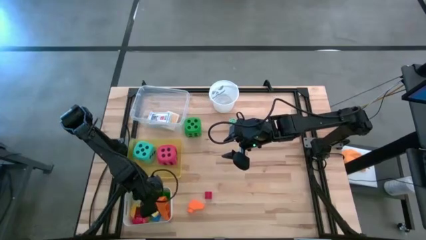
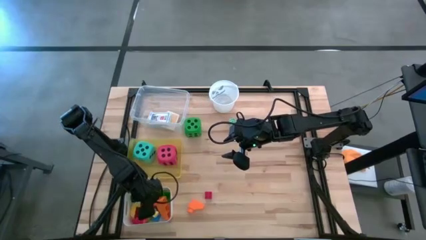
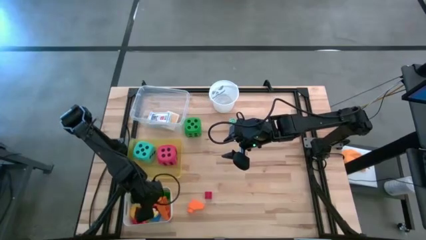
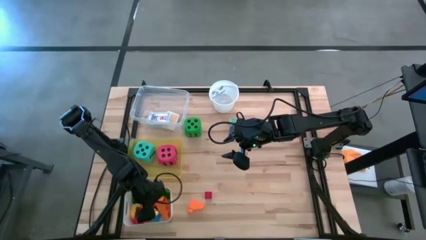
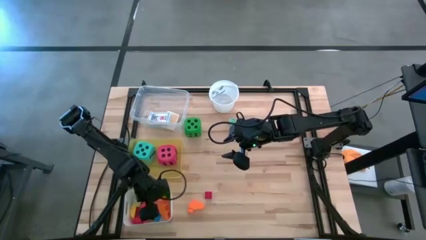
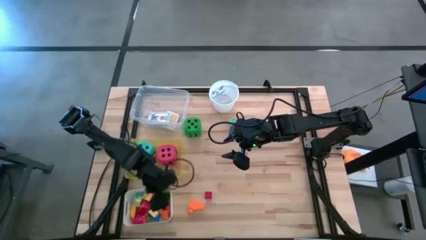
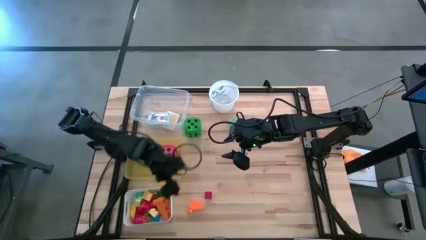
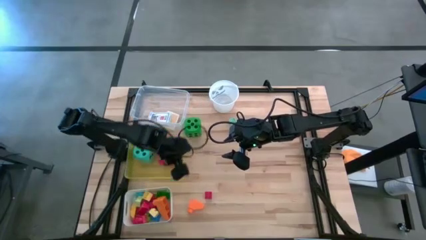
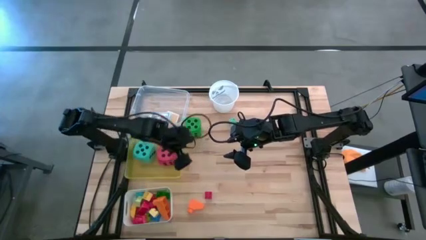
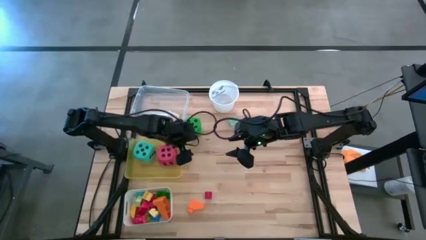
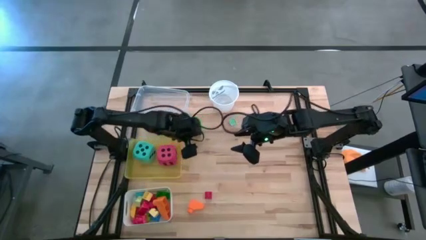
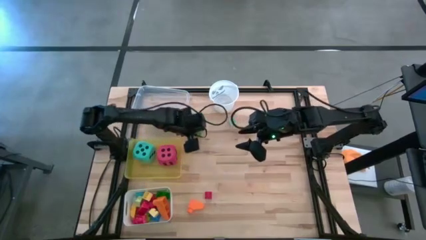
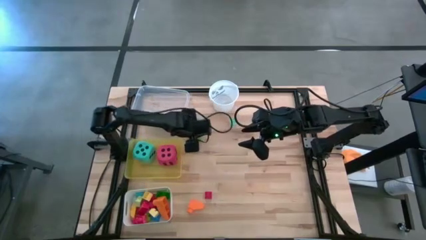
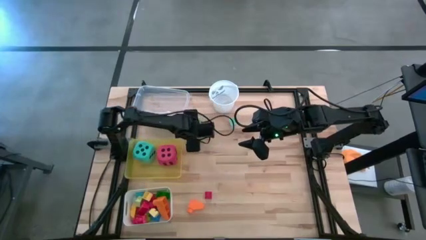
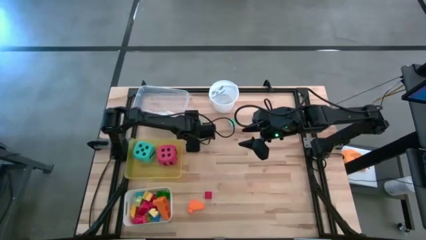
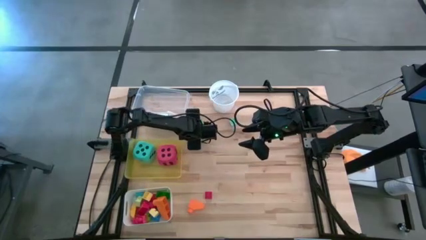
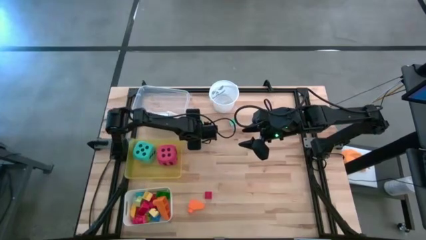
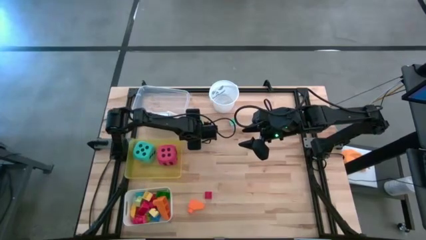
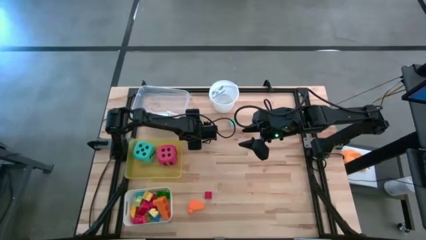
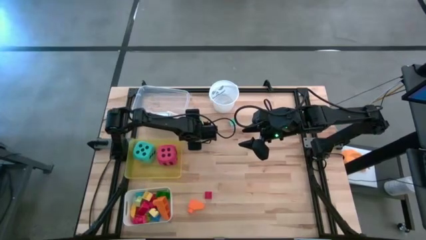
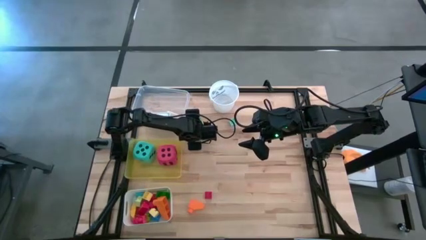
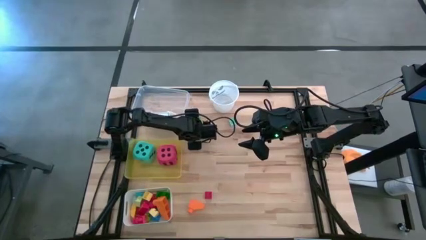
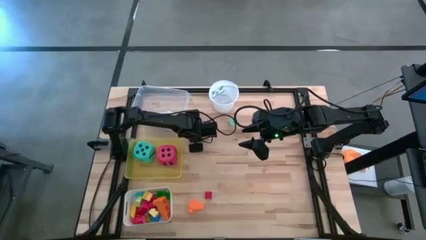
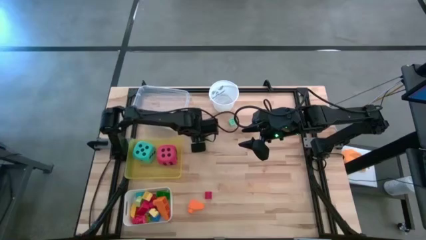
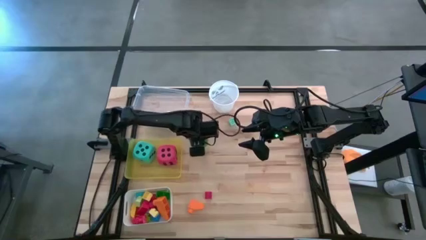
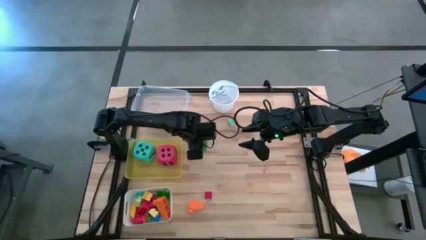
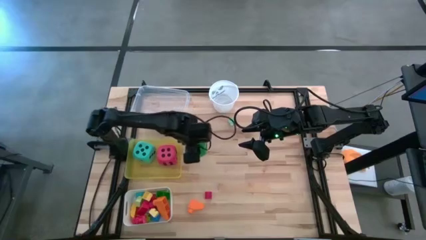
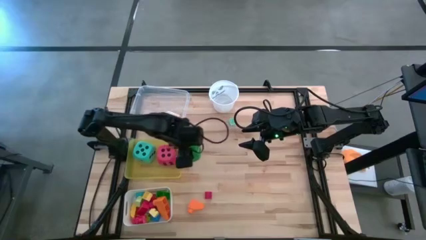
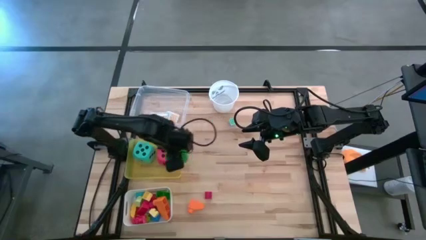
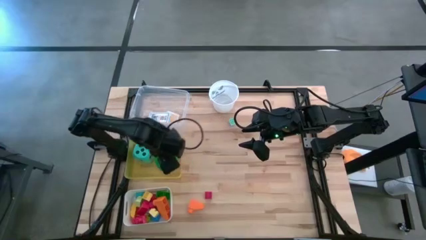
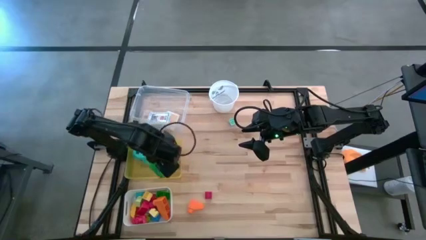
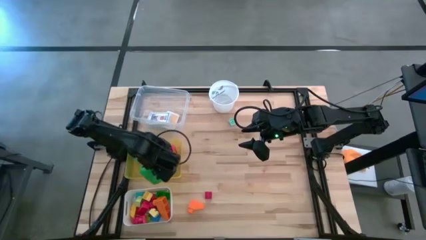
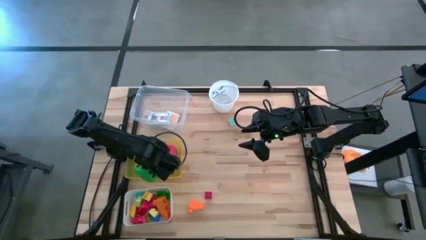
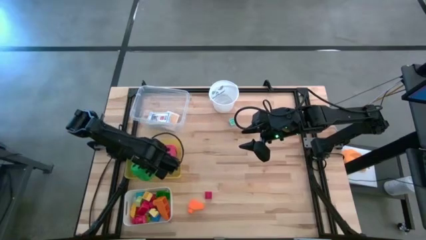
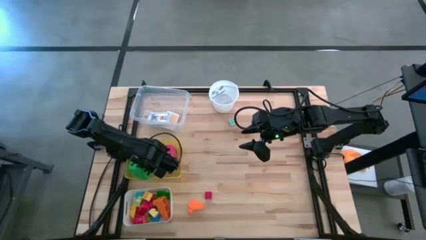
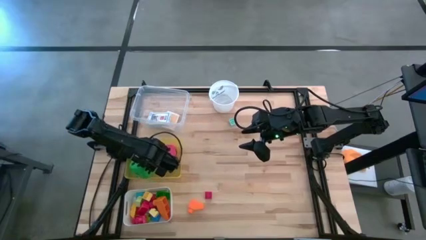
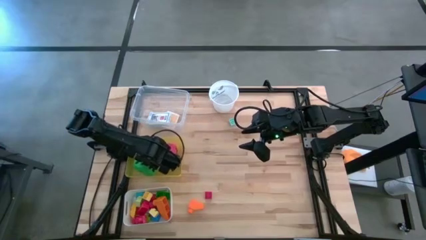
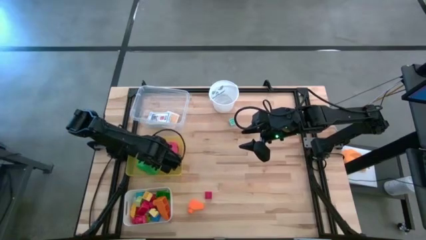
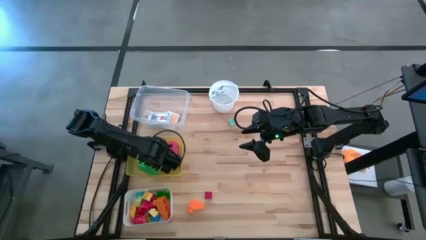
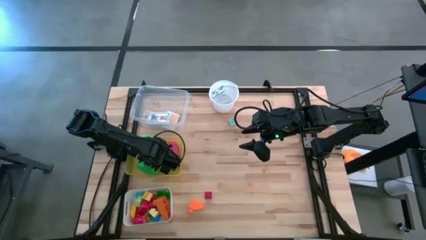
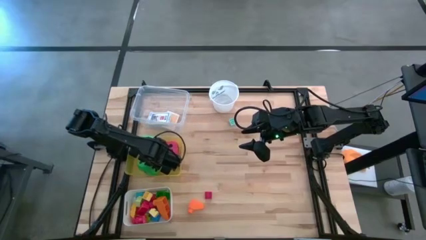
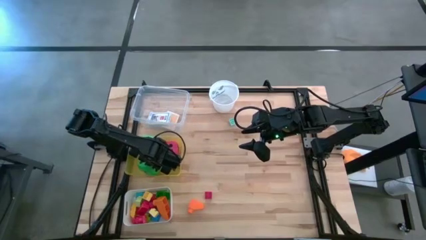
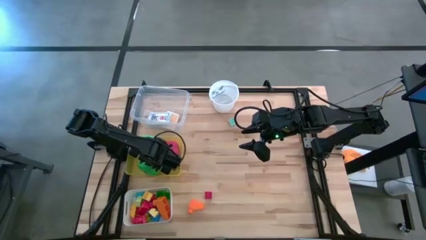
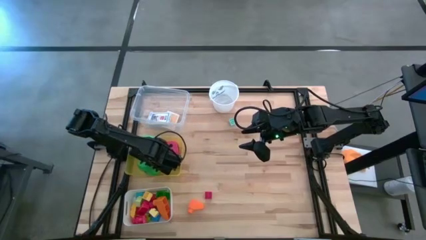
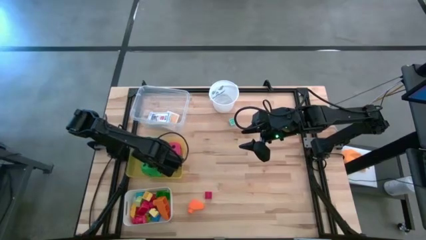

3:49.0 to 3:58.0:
Task: Pick & Place Toys
Put the green die into the yellow bin

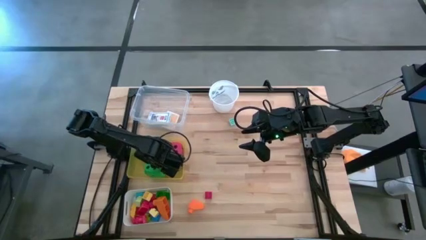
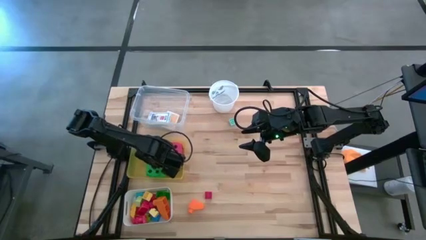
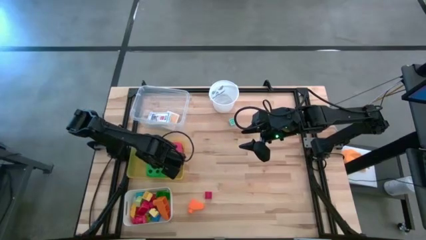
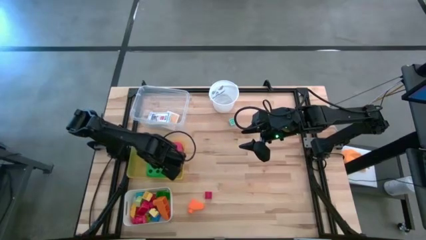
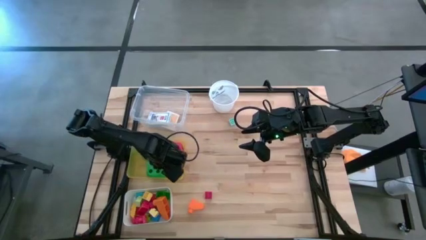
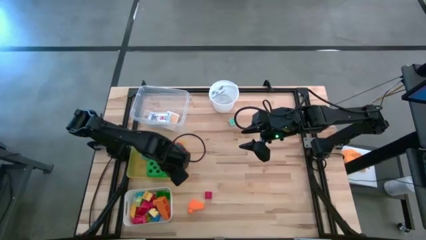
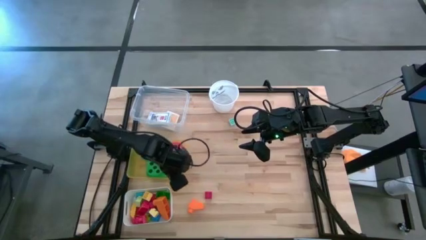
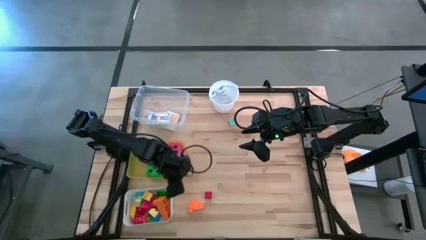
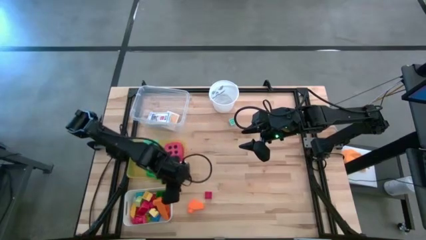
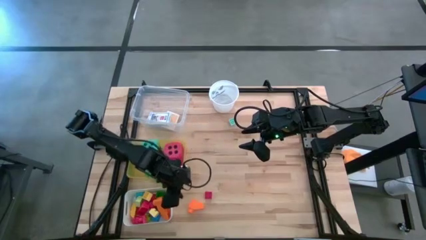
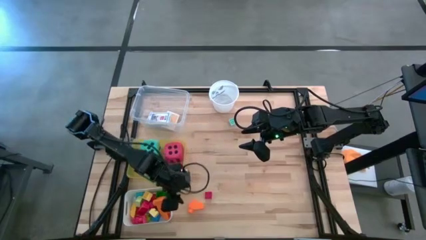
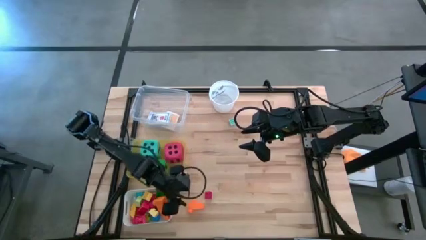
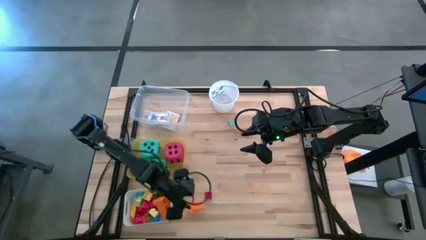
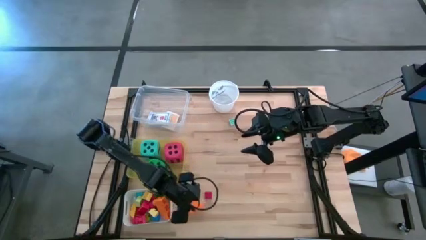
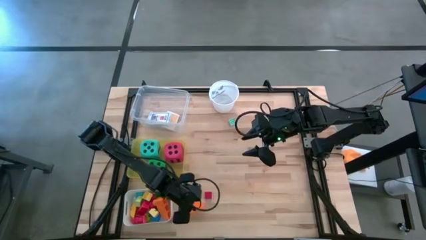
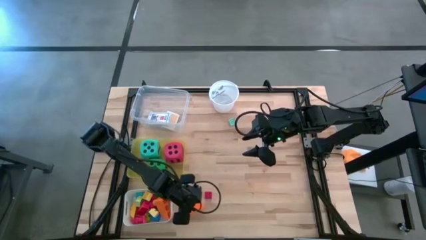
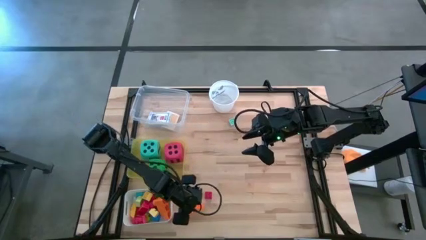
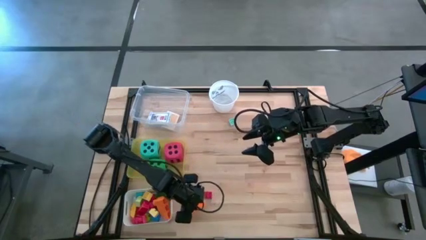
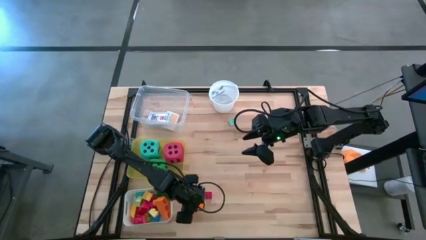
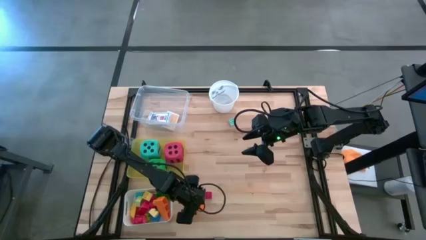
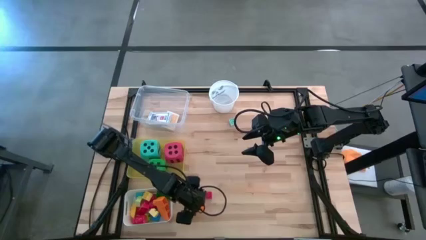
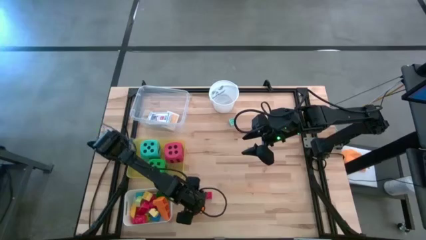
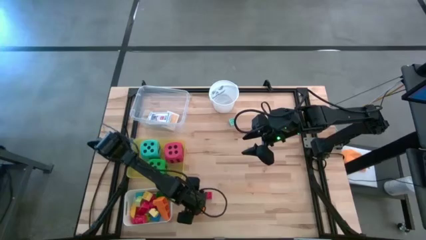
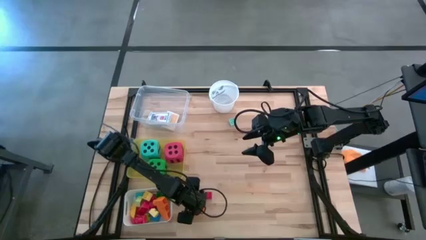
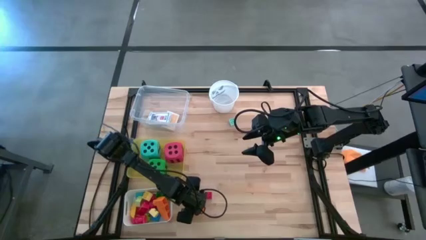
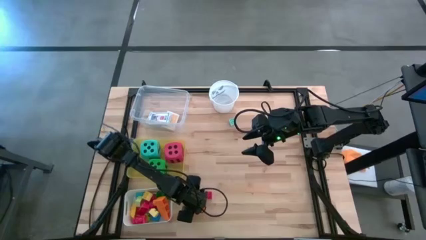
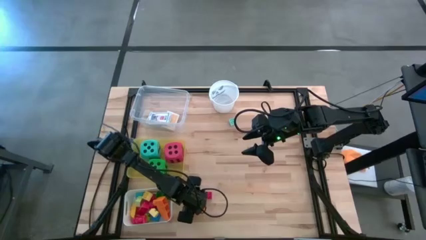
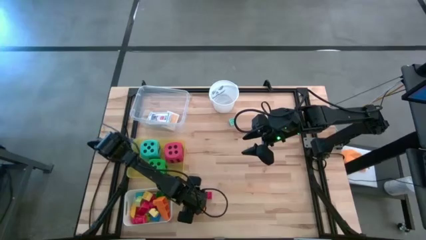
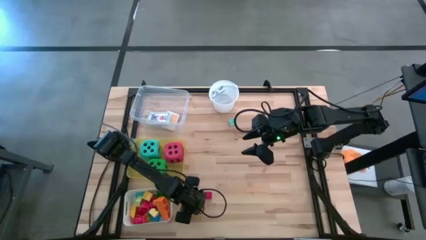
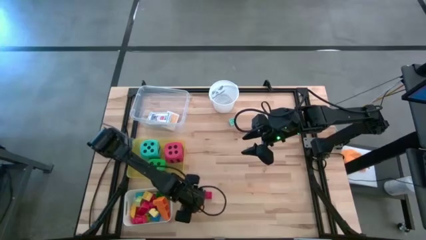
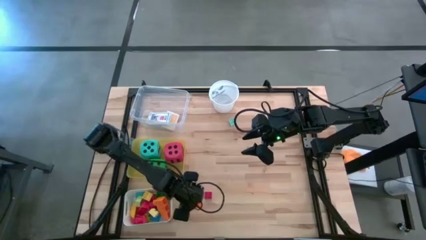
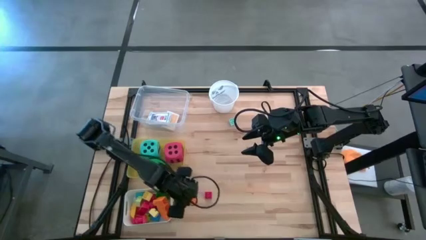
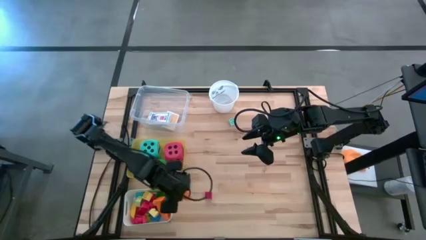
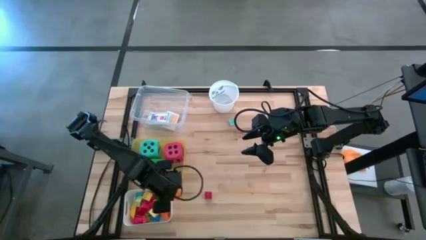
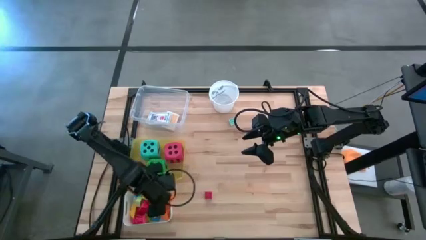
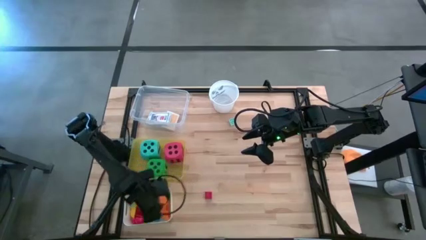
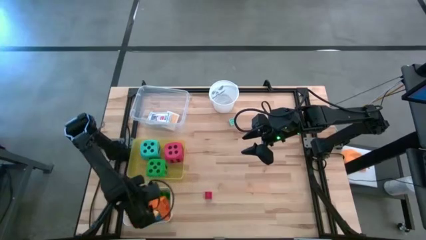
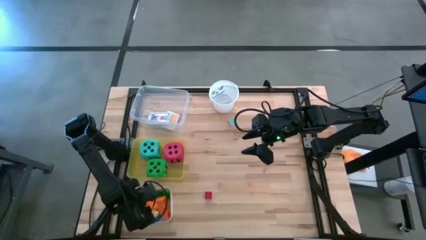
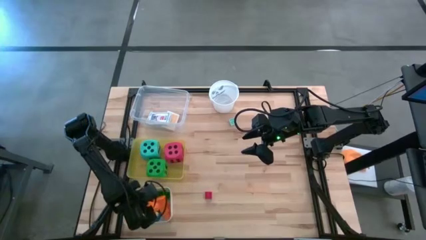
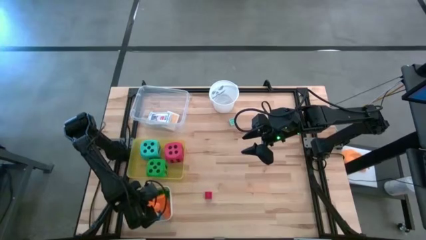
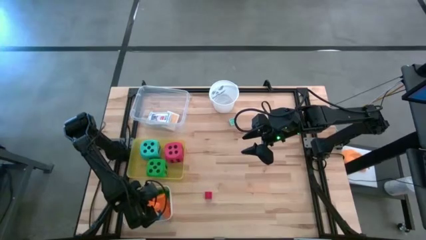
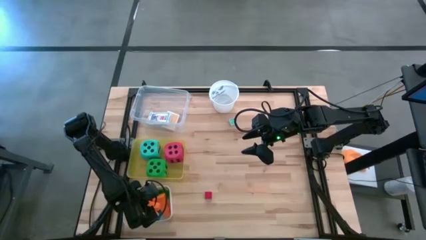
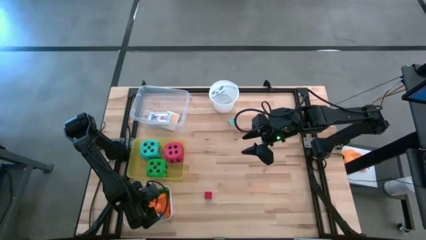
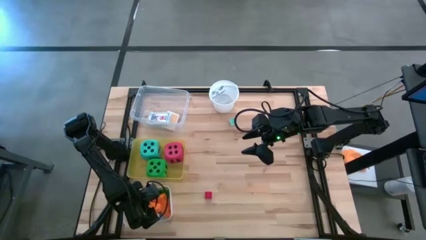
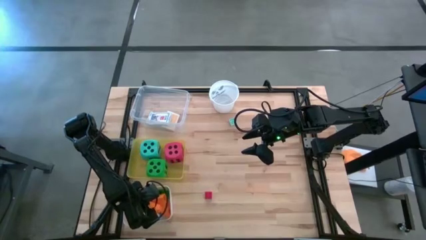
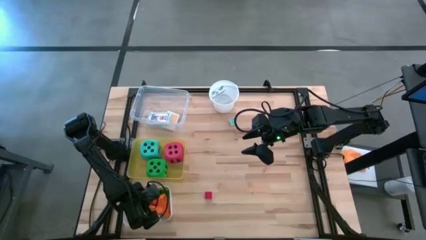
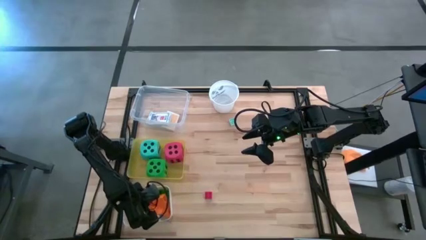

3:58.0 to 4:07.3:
Put the orange game piece into the white bin
